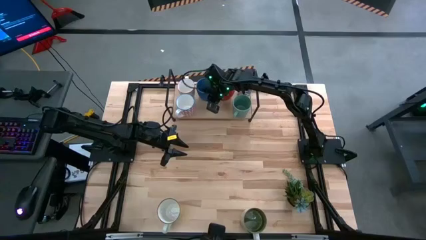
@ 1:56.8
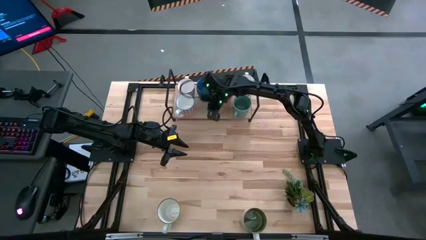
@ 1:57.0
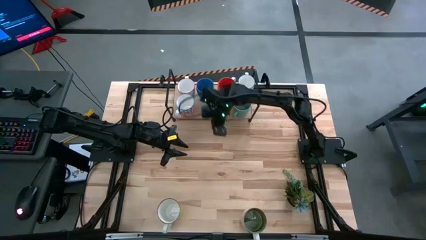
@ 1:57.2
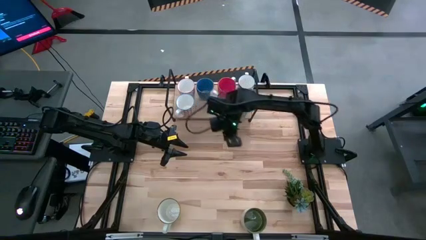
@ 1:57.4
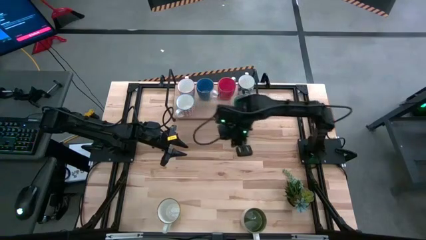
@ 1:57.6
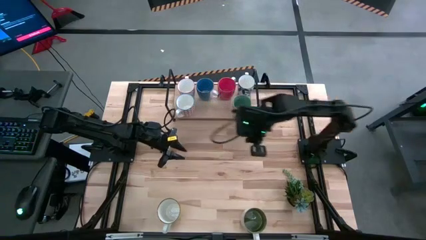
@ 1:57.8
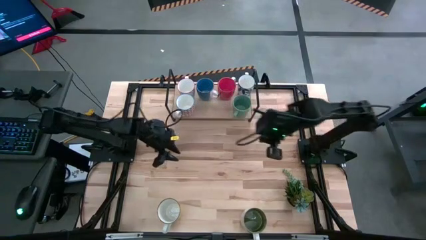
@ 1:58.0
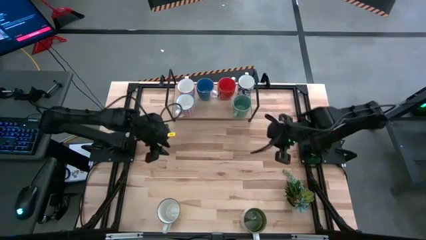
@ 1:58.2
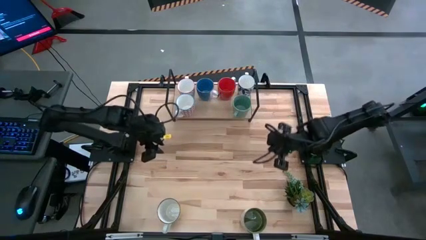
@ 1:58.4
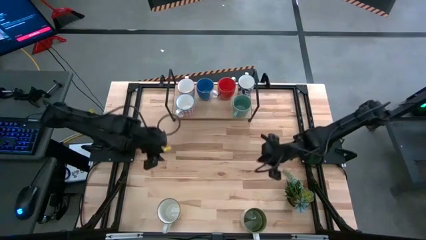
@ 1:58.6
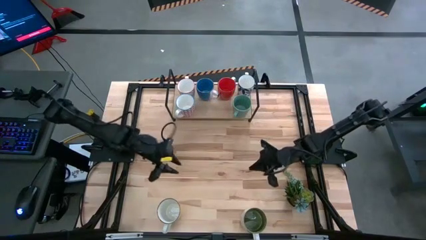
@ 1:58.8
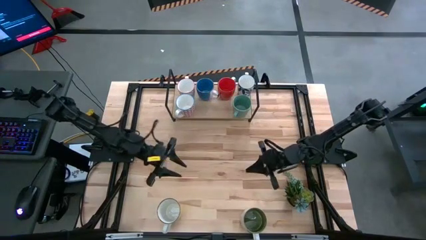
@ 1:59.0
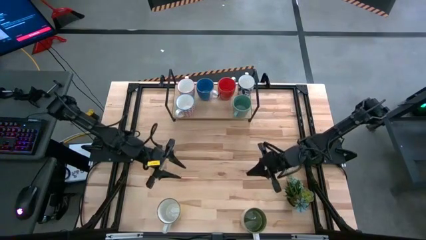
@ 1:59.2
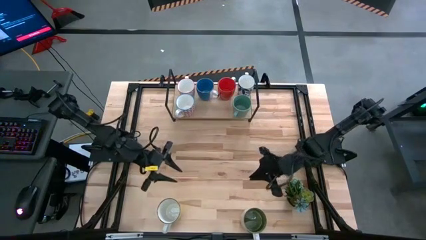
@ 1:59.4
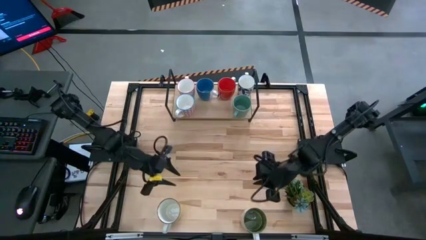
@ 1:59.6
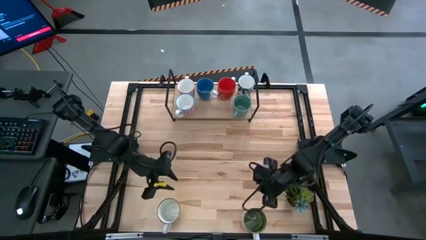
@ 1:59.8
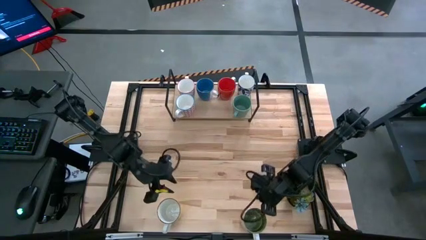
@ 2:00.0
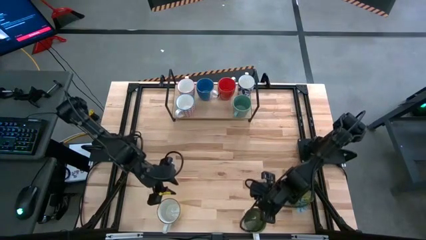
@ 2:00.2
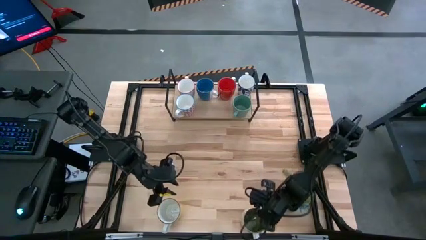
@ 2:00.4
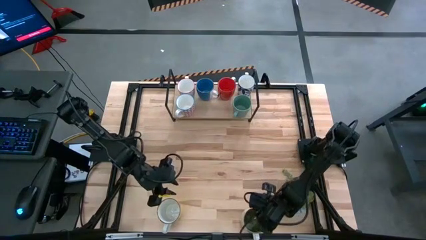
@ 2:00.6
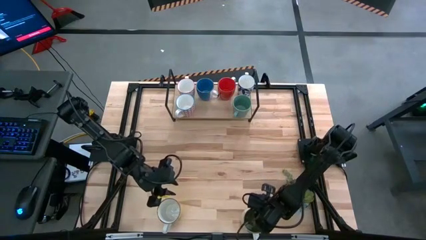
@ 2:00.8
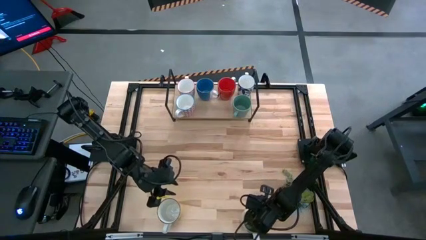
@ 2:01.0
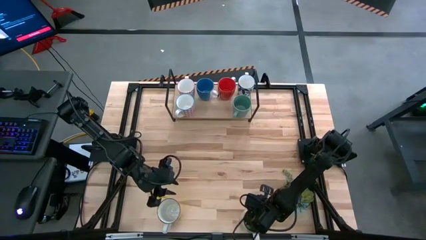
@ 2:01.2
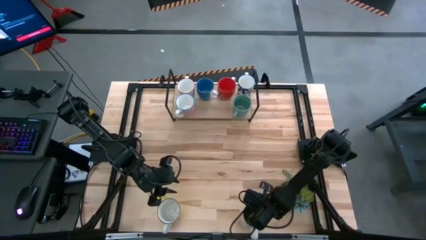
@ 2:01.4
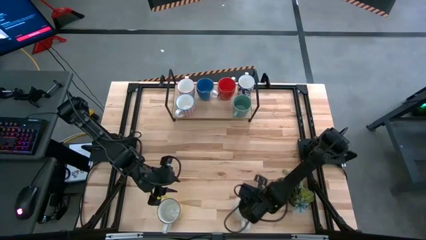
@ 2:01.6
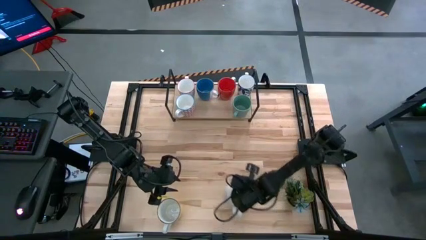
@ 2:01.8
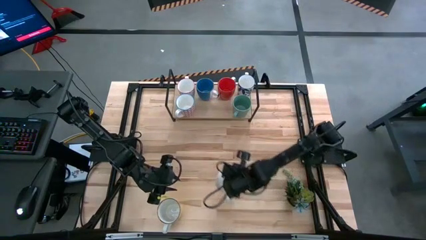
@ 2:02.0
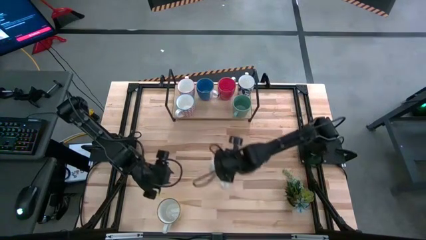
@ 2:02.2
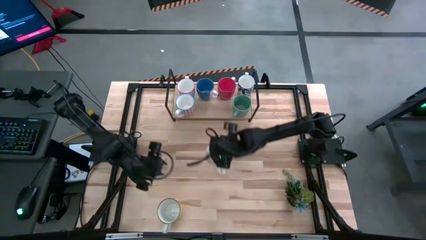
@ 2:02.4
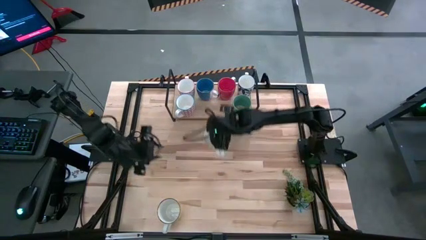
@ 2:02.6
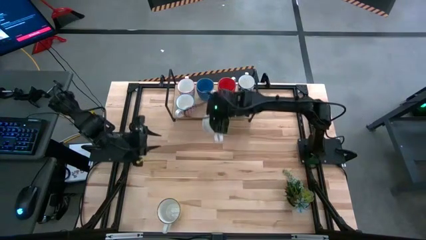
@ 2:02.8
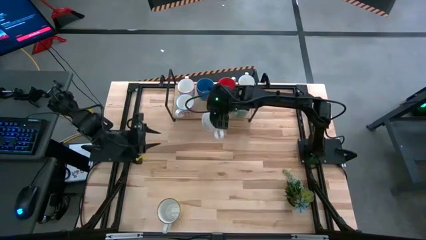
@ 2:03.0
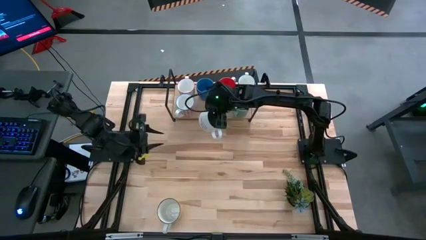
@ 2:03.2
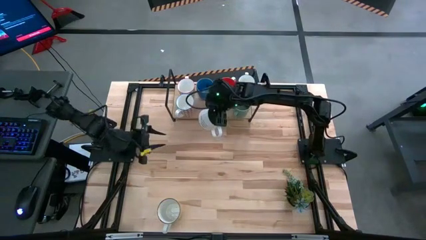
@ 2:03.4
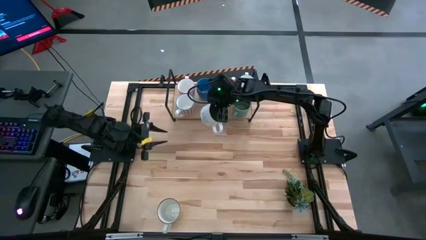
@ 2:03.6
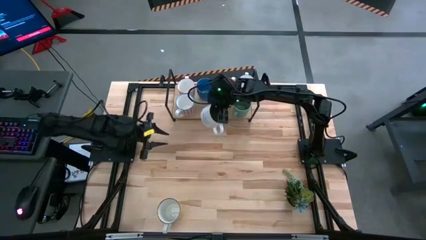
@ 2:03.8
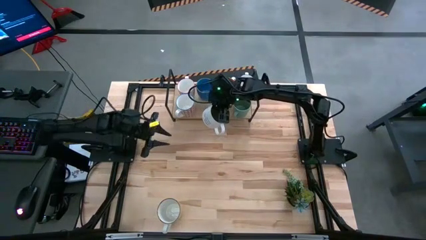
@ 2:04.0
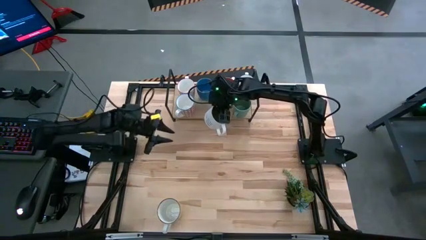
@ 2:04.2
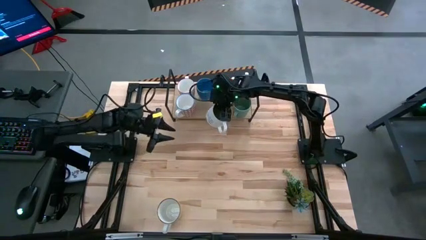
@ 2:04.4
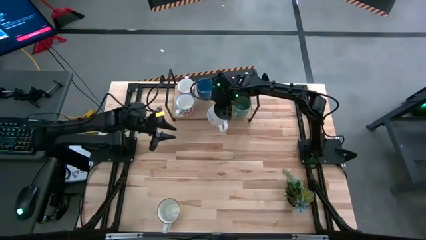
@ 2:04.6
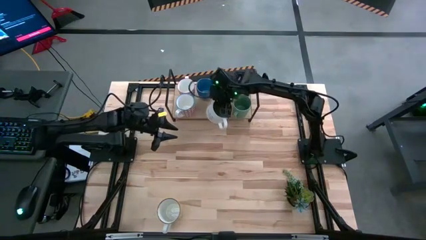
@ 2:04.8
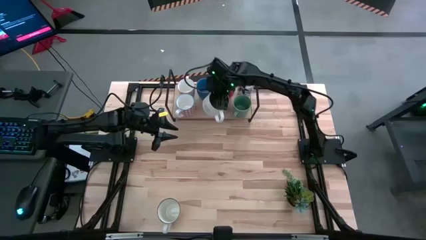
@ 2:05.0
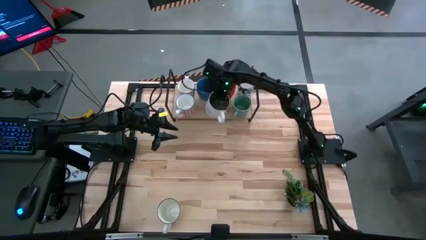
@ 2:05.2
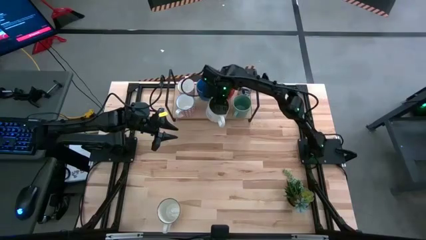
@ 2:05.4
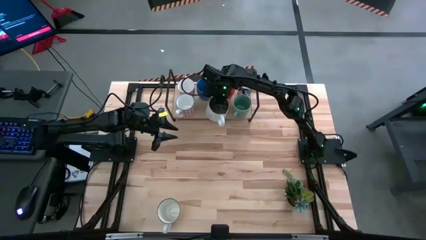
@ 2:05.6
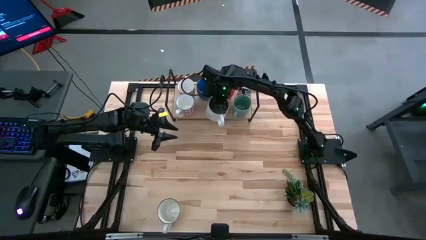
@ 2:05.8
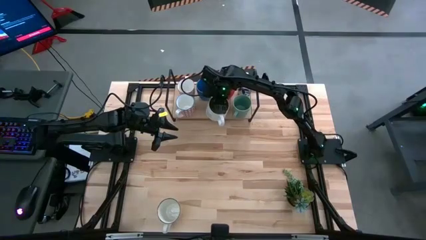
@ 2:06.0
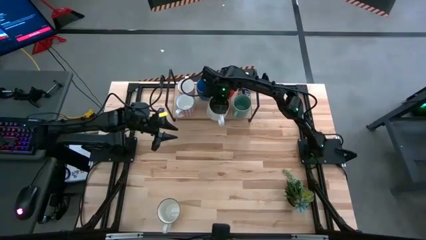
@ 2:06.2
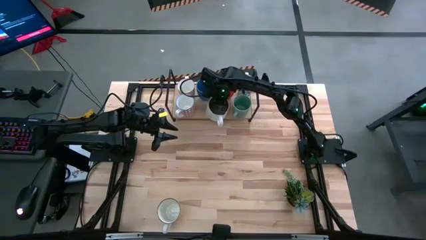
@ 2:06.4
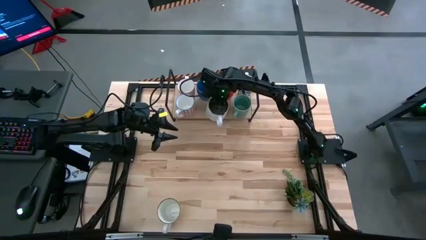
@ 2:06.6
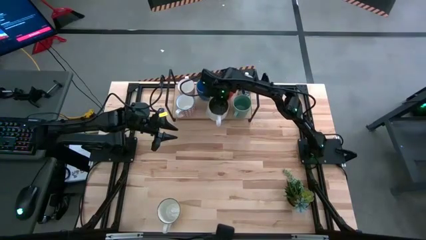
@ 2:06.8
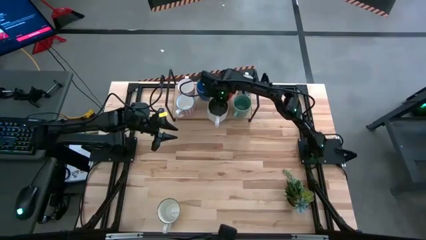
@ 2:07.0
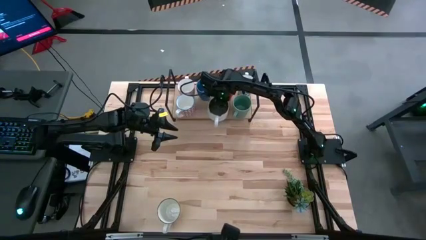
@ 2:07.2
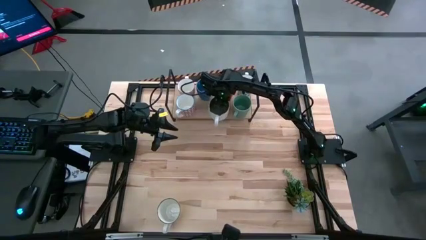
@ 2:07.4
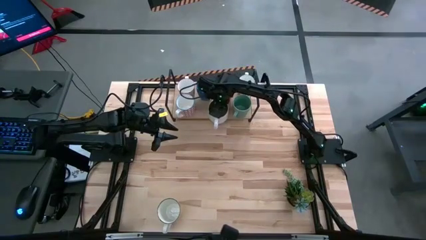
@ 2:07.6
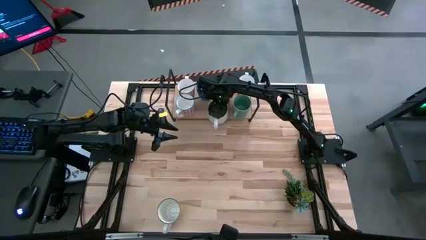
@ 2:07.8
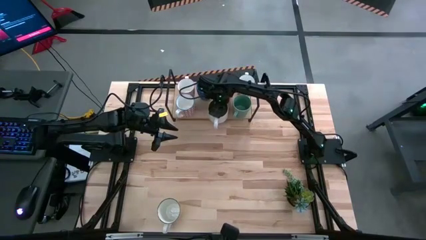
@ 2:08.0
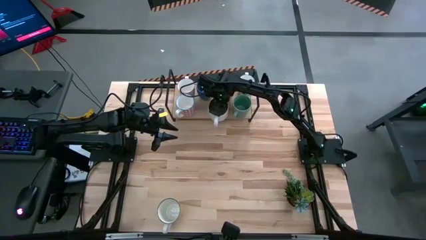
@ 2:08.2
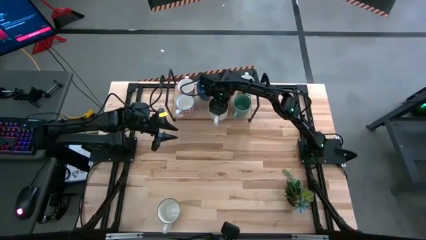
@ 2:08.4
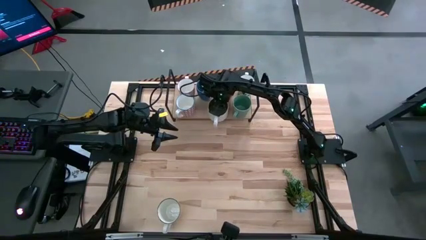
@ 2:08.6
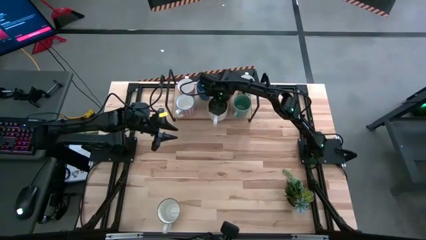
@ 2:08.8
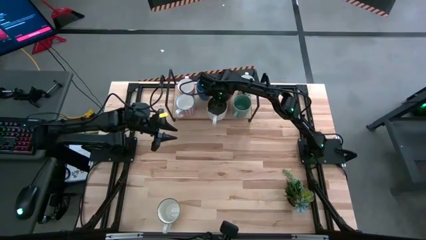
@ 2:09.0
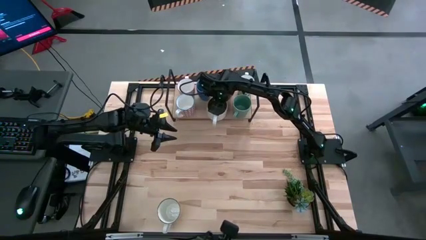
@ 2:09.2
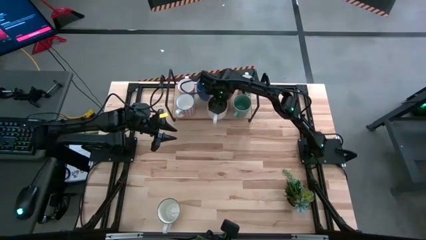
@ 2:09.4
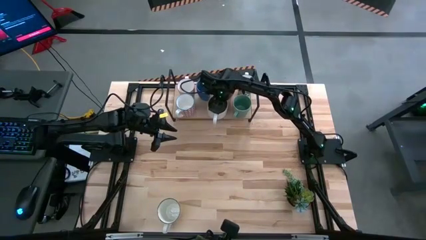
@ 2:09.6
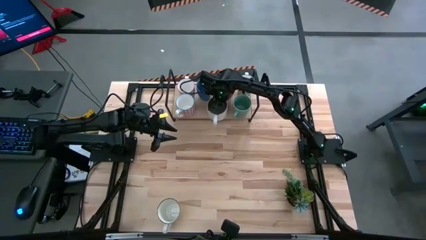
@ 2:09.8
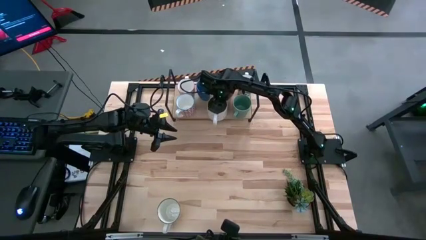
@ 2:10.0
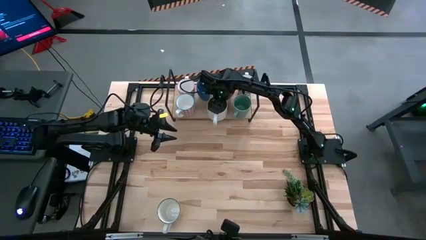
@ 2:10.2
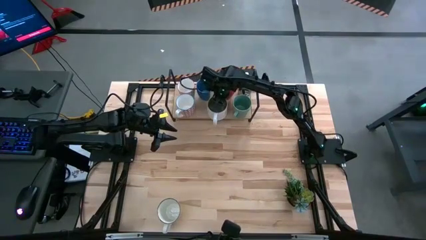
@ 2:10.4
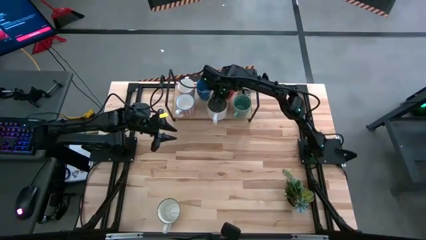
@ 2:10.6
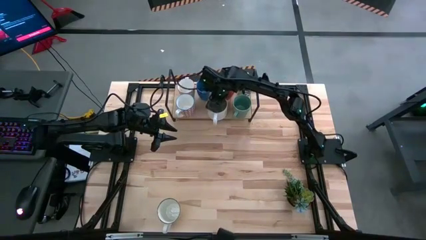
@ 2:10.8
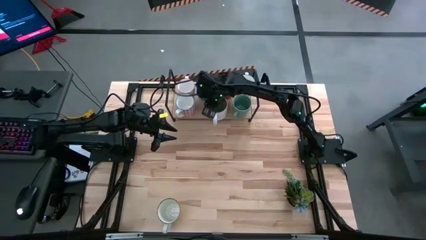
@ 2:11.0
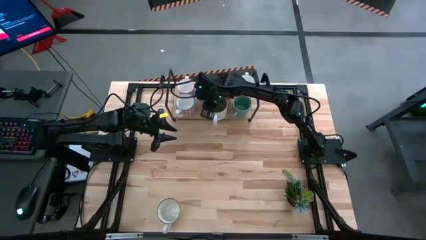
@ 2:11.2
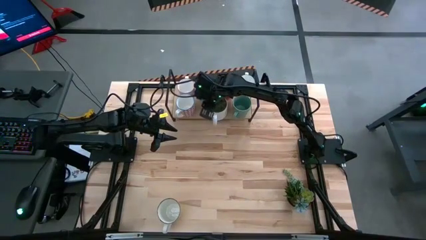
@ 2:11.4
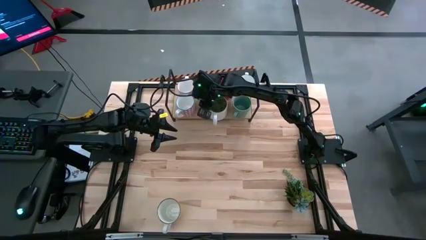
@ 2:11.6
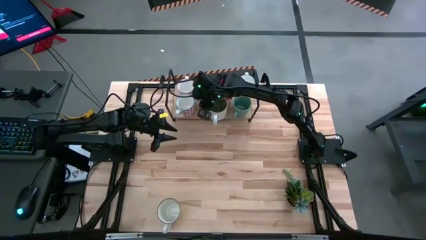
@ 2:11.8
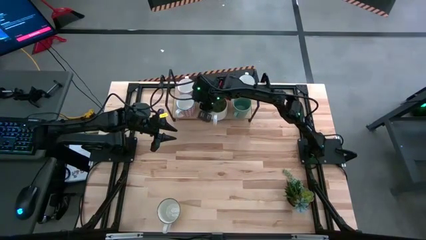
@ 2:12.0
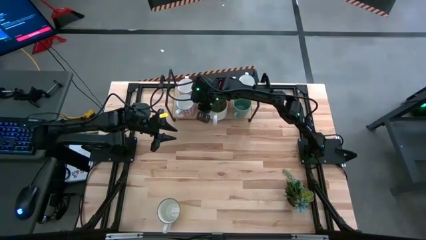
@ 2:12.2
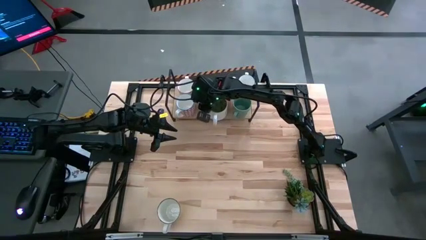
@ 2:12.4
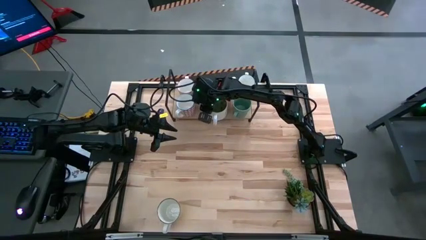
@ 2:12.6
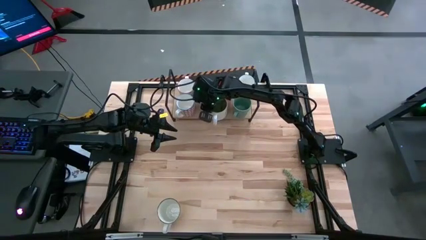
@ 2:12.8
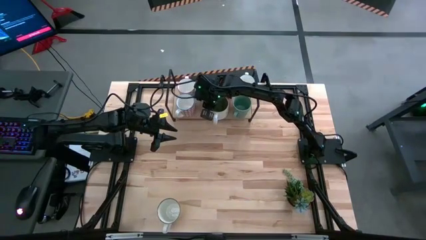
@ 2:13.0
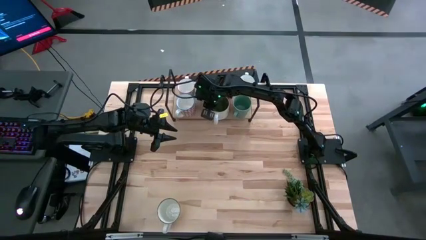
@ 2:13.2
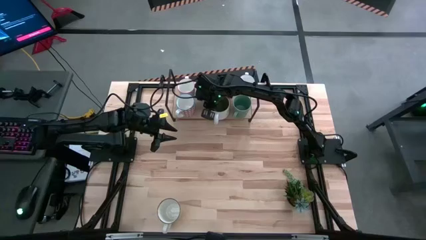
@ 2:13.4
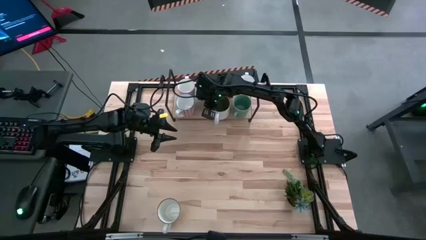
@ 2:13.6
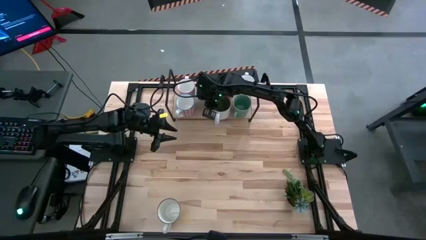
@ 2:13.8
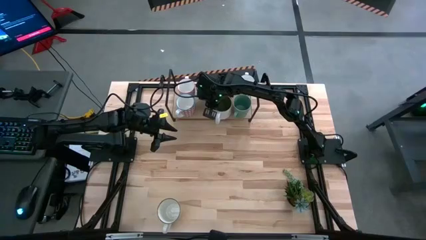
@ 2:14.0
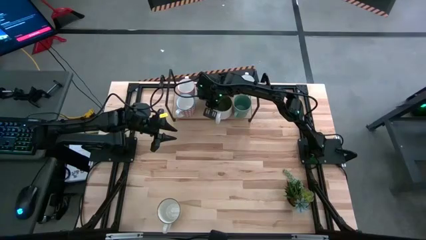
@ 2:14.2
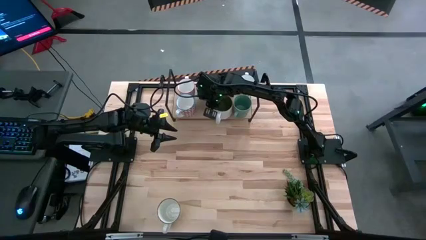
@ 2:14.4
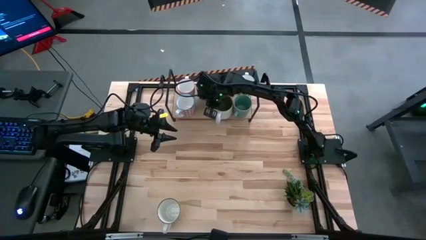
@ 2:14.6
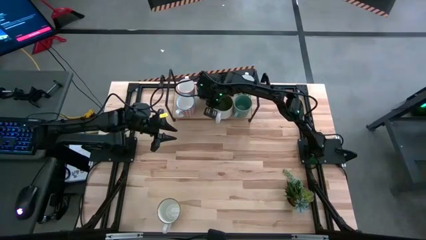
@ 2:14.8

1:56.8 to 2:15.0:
Task: Place coffee mugs
Put the white mug on the shelf
